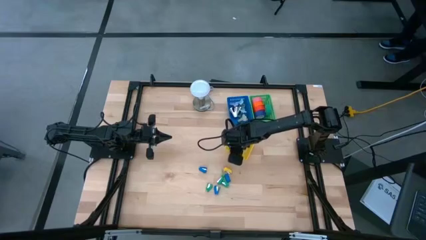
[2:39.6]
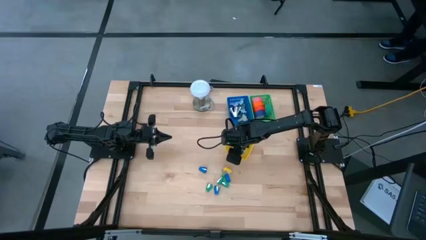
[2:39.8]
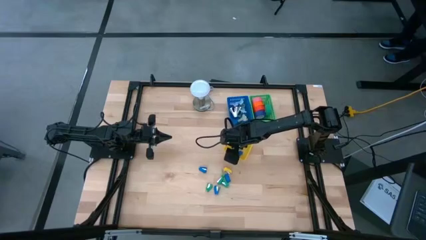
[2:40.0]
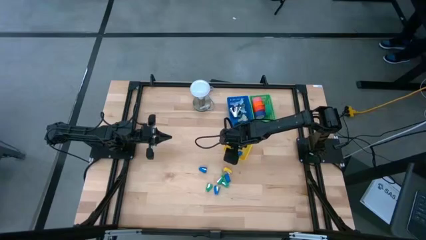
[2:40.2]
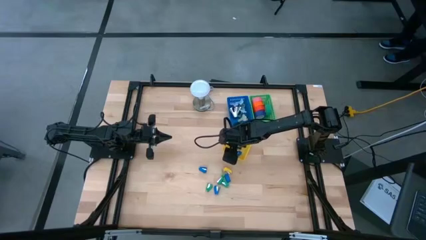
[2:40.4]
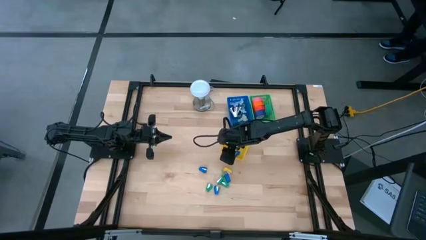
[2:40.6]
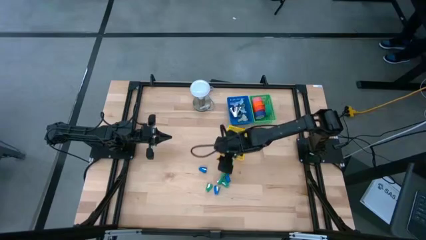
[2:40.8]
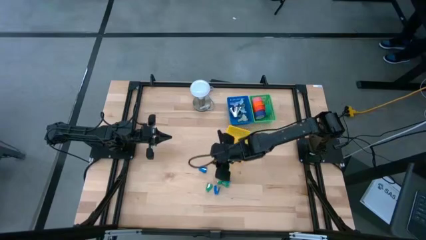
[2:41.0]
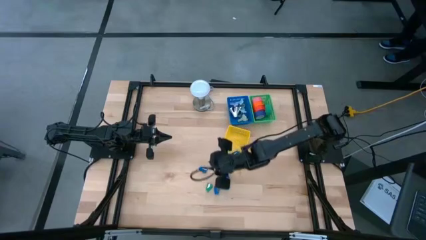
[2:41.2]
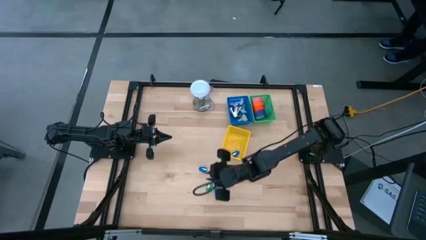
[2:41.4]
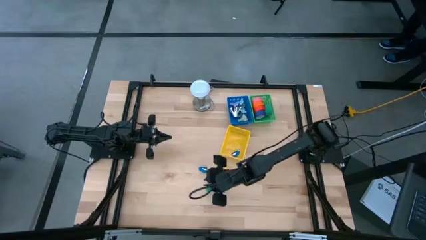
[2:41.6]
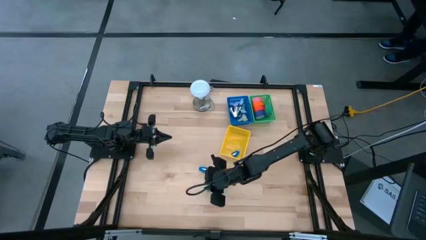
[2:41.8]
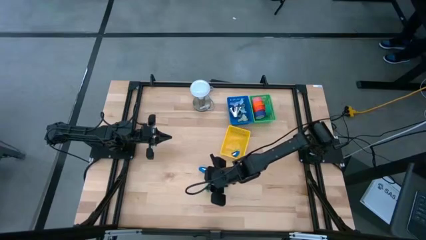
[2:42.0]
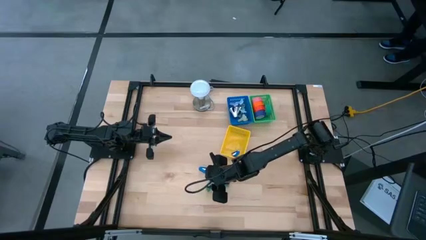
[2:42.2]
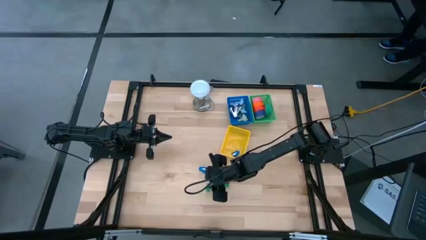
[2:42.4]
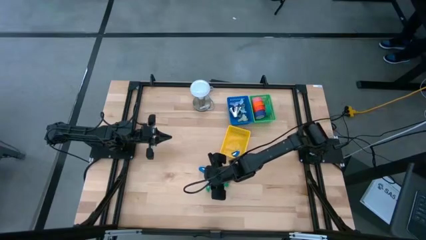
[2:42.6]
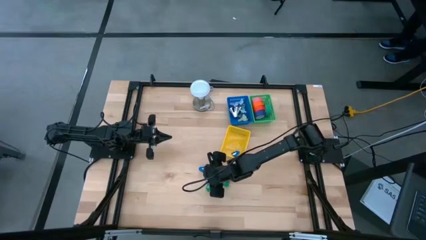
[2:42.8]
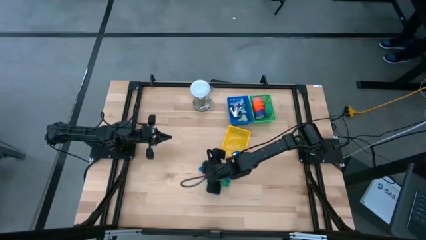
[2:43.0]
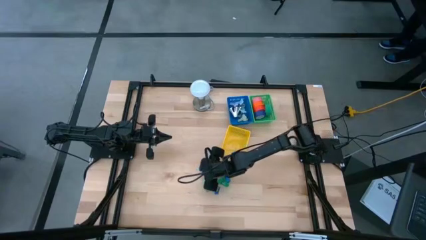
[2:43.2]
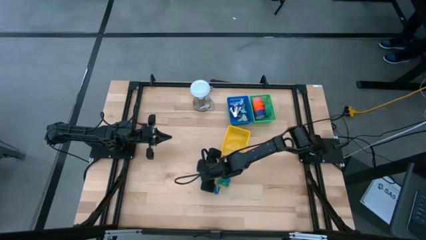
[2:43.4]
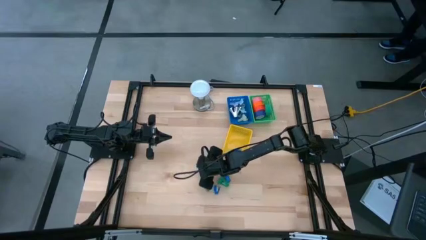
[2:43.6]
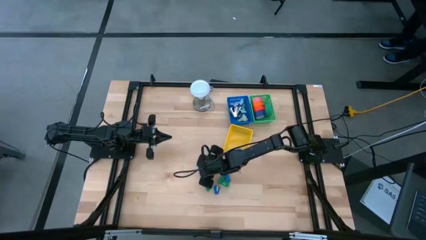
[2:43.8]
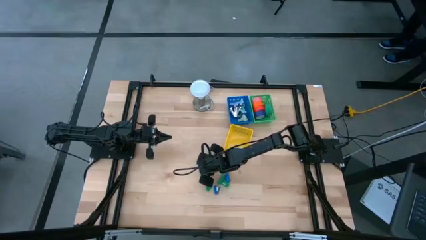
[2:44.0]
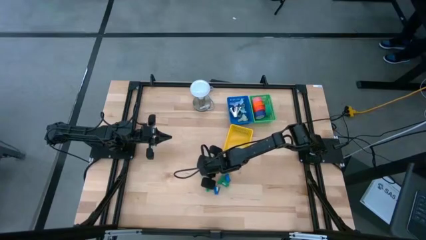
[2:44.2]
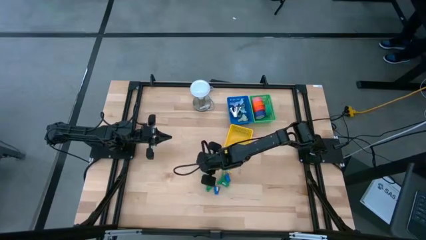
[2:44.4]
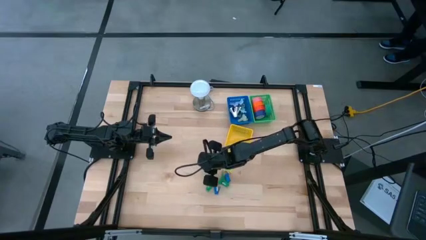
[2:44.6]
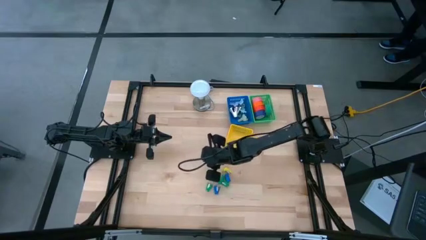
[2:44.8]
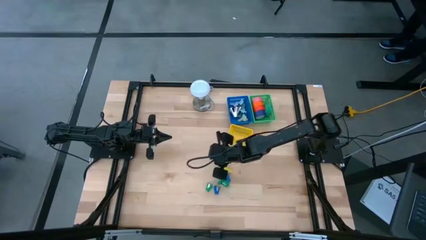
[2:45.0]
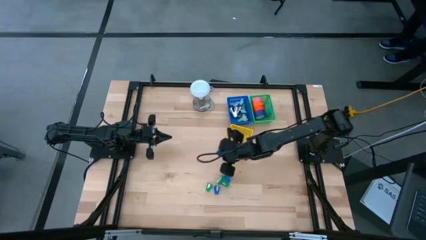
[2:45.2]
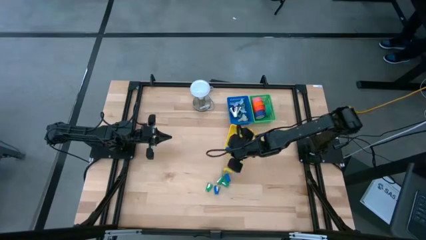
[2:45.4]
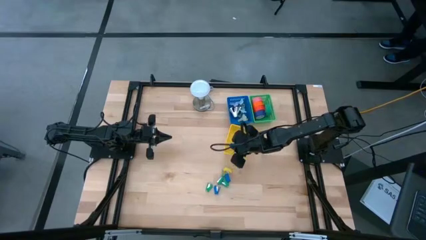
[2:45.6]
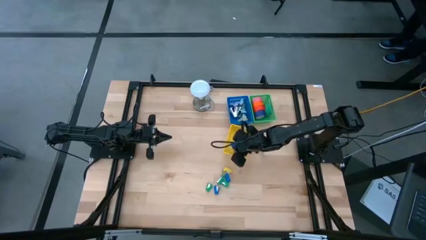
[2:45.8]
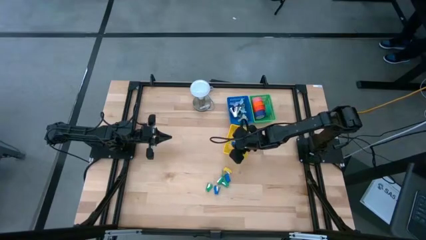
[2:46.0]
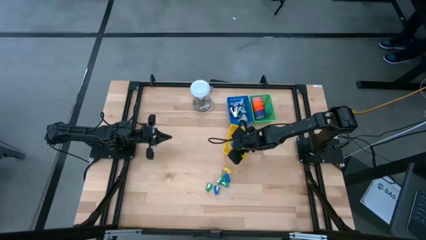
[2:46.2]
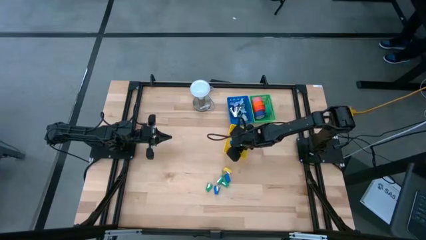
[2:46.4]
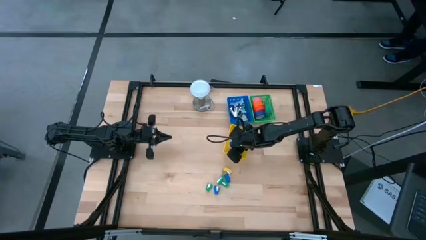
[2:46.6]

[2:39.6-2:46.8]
Task: Pick and place Stapler, Stapler remover, tape
Put the blue stapler into the yellow bin

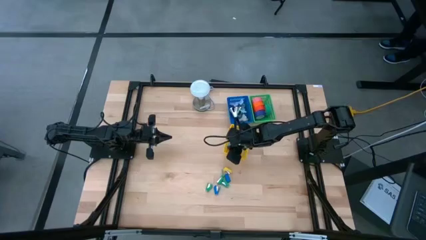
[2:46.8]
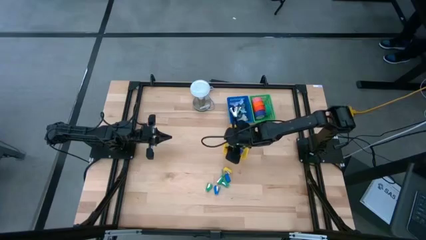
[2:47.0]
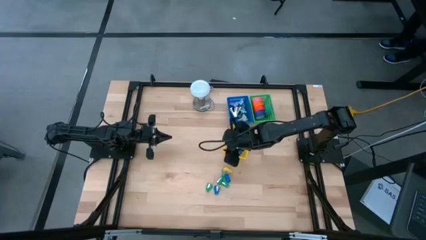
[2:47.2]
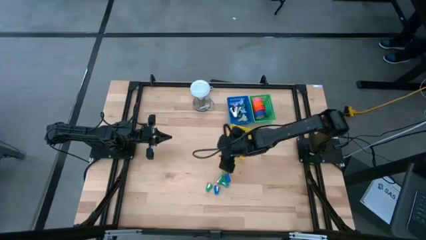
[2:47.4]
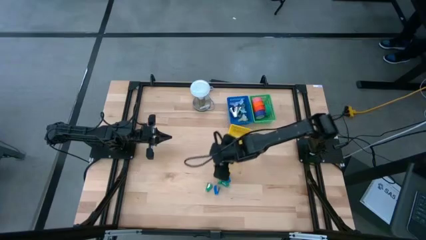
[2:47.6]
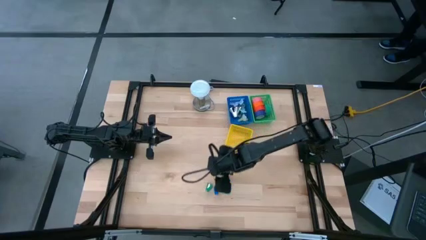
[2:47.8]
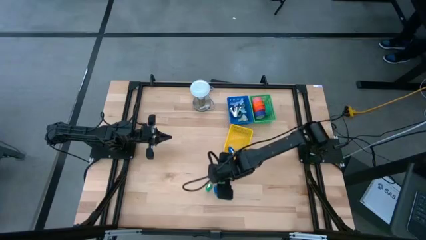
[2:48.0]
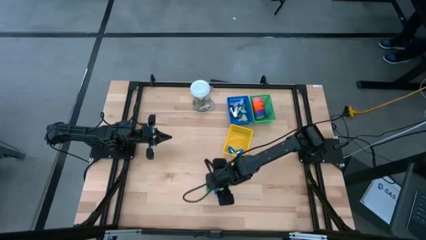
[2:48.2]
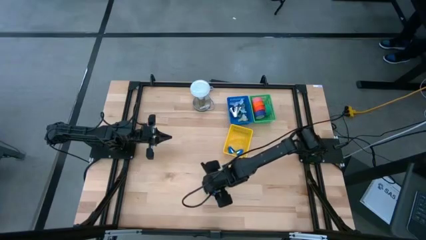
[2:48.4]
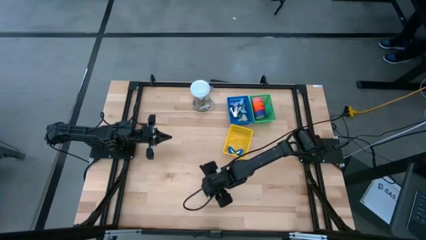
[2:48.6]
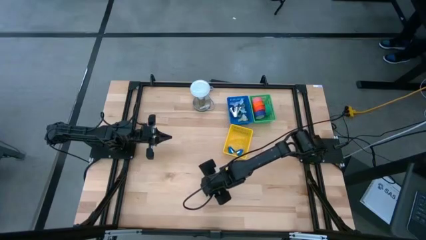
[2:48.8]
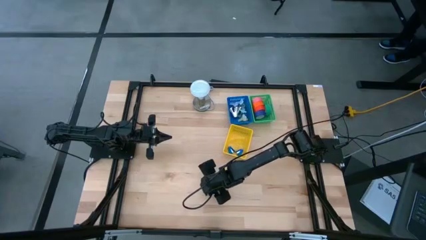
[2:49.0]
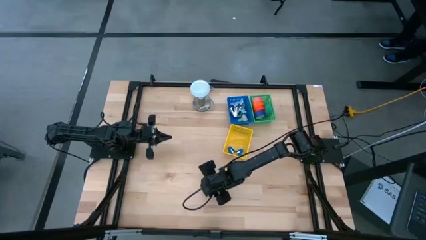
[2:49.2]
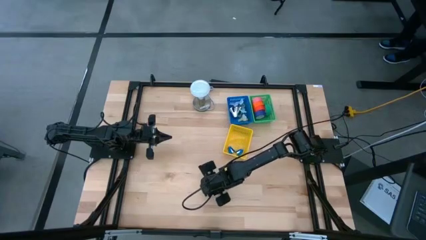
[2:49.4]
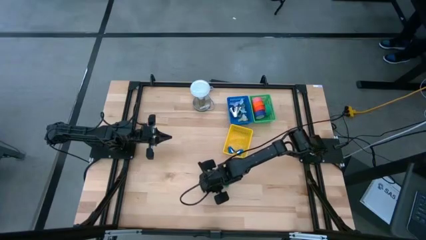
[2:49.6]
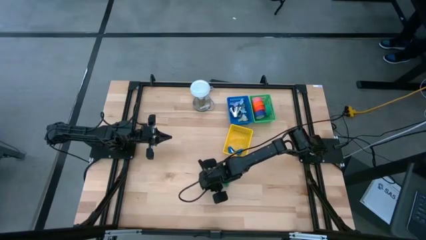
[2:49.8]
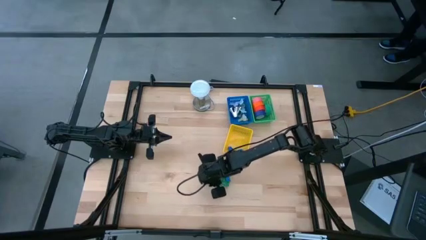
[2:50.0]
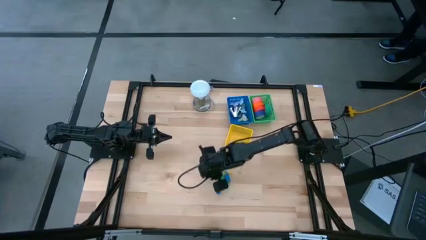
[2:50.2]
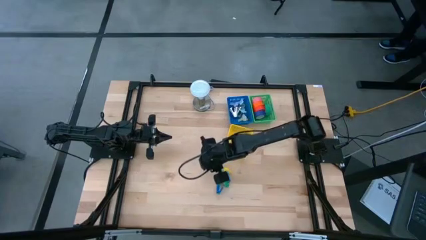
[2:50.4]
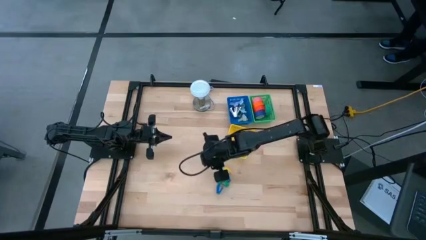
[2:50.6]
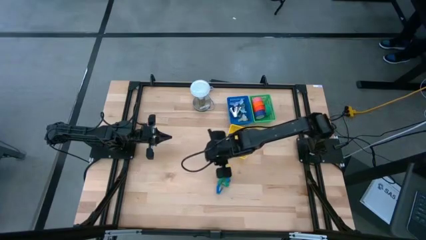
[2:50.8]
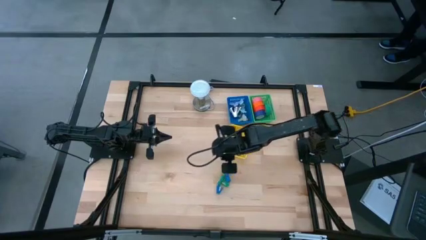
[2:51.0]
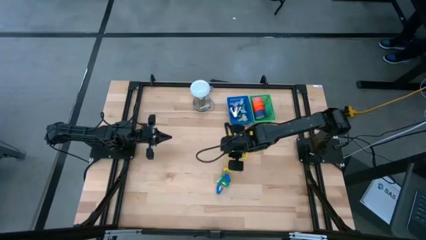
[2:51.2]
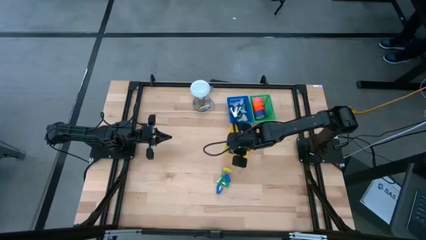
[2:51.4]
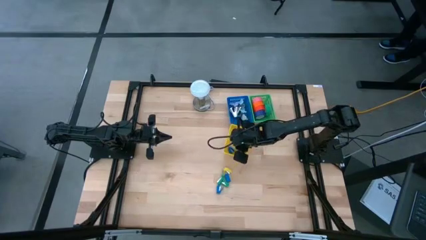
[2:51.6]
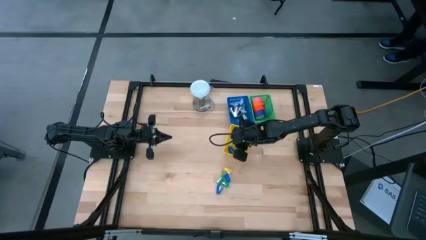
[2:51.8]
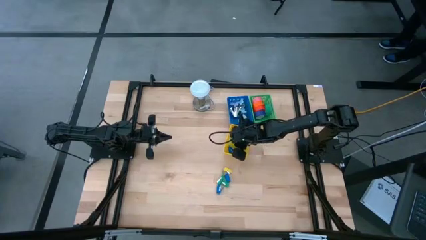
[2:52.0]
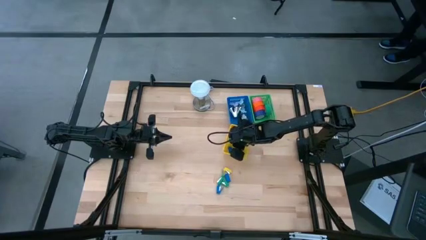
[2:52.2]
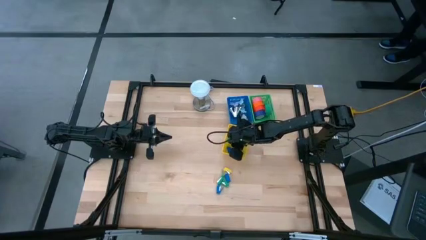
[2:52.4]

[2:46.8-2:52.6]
Put the green stapler into the yellow bin

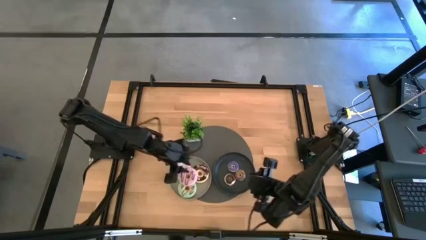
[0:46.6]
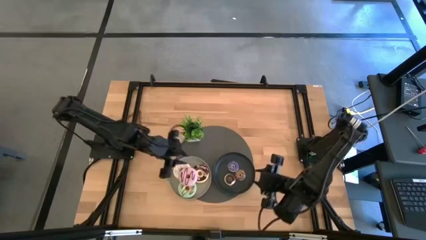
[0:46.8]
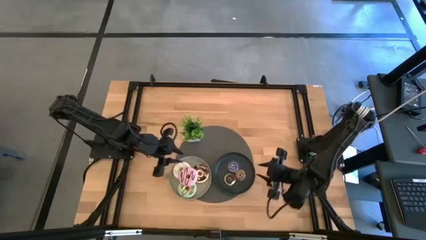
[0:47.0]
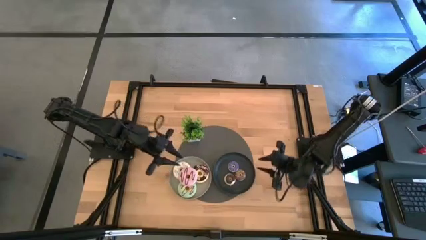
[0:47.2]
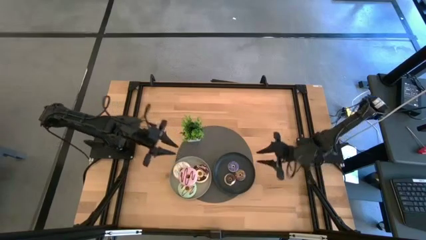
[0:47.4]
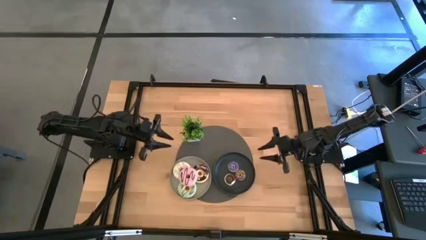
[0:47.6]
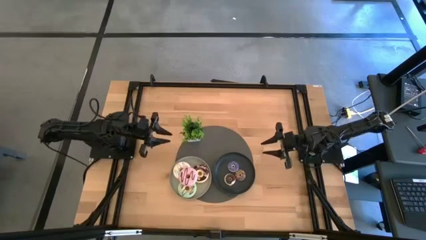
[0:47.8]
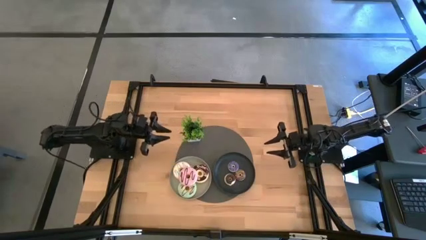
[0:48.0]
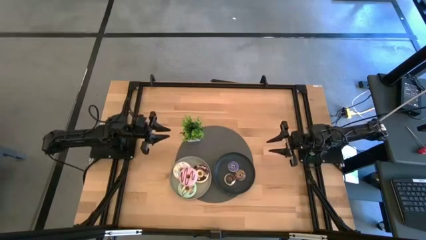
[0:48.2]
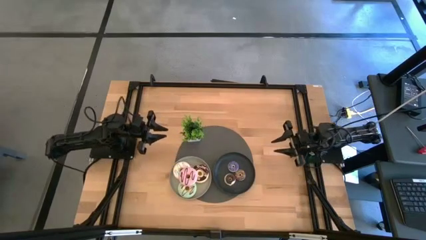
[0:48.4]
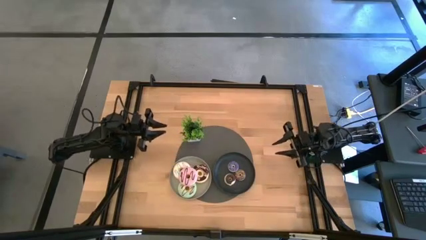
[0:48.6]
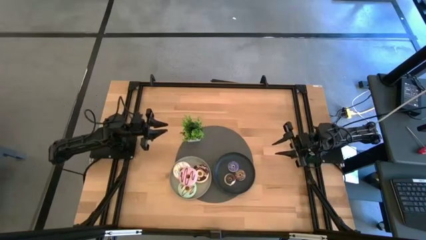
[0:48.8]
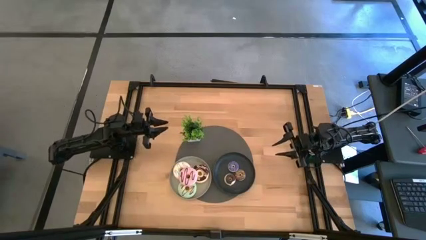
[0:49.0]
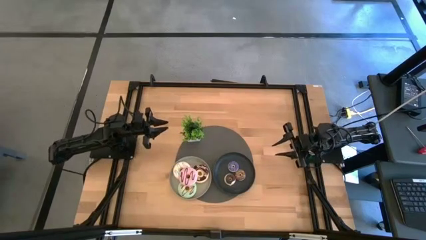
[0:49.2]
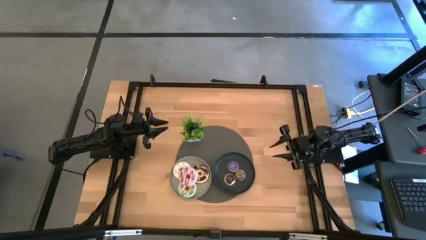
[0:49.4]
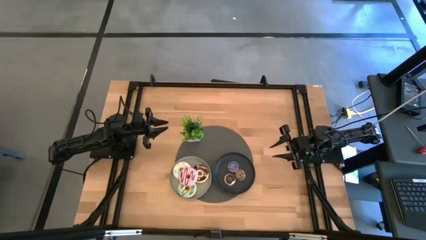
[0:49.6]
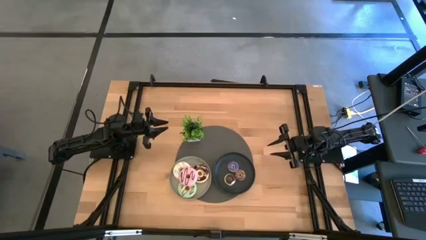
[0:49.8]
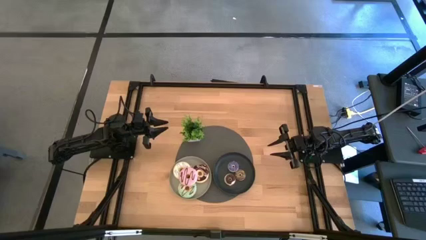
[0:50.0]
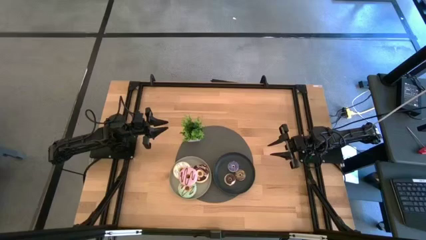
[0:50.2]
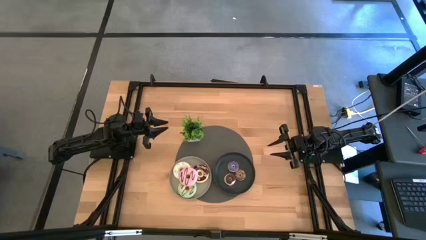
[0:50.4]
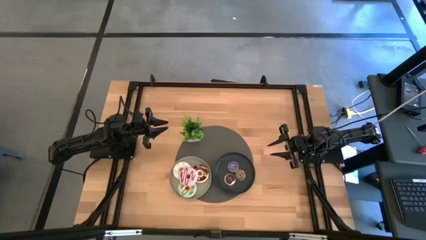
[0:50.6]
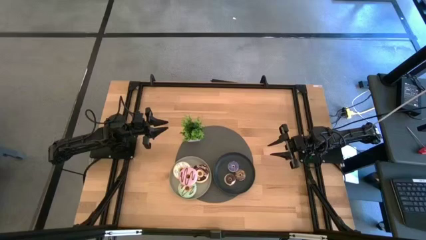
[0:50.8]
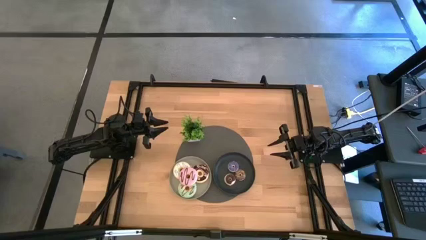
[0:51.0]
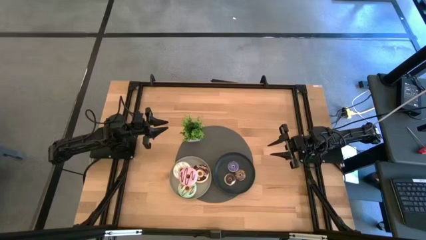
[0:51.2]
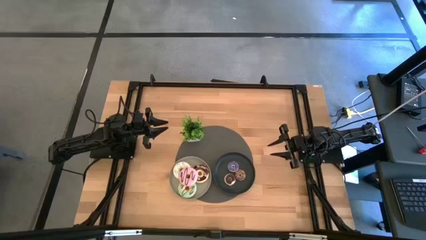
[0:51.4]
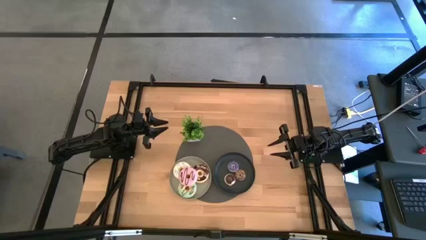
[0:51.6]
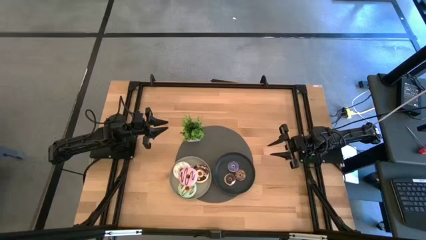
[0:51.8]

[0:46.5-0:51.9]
Task: Pick & Place donuts
Return to Home Position
